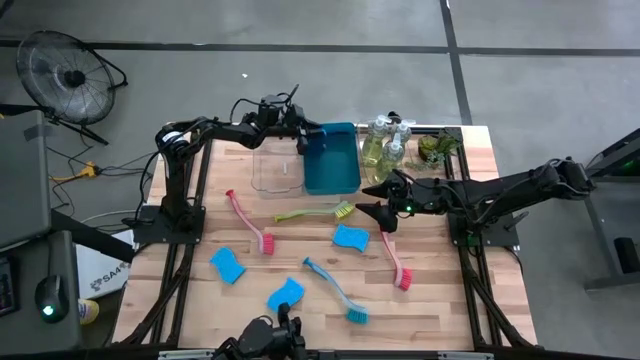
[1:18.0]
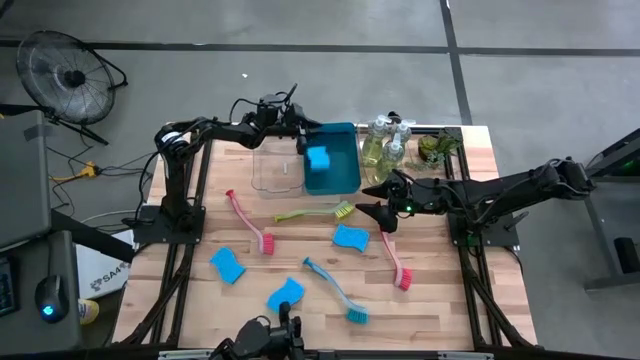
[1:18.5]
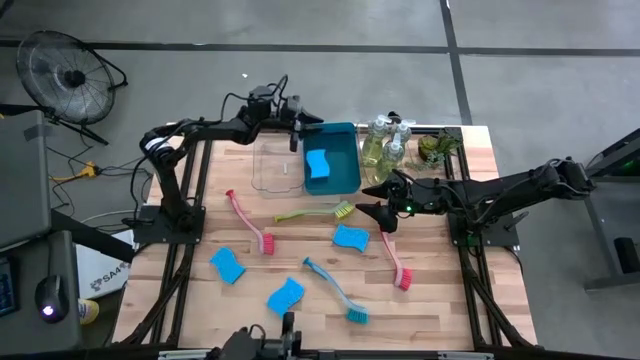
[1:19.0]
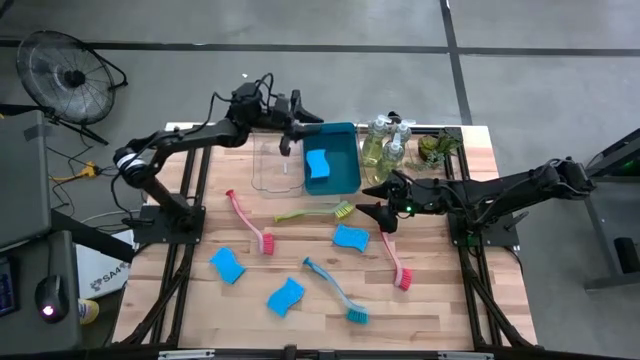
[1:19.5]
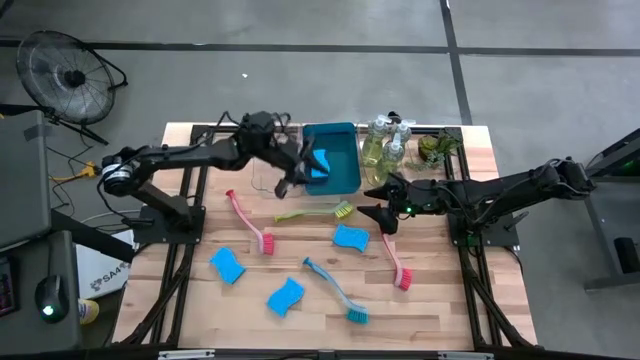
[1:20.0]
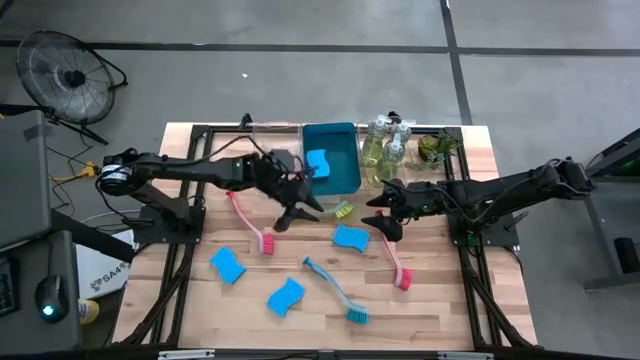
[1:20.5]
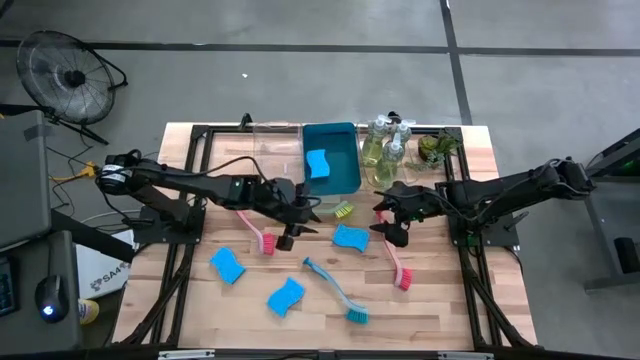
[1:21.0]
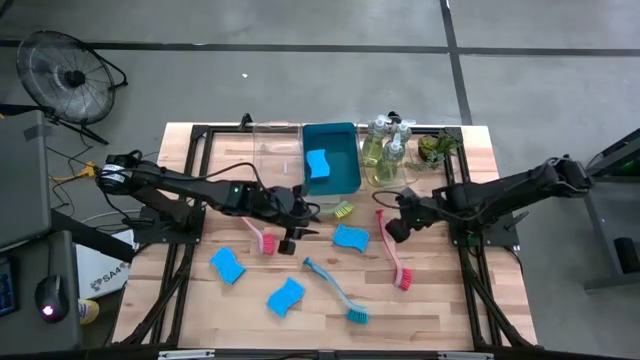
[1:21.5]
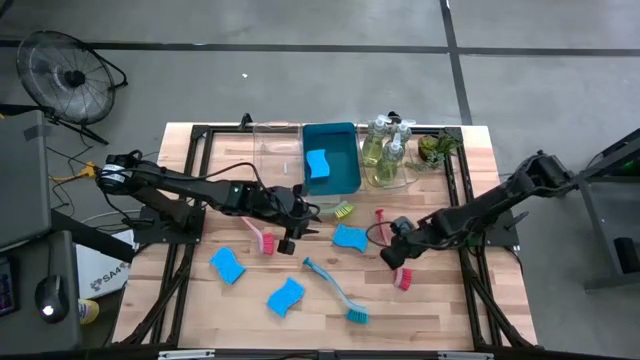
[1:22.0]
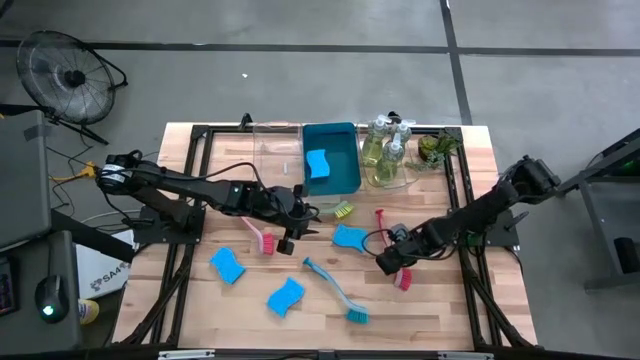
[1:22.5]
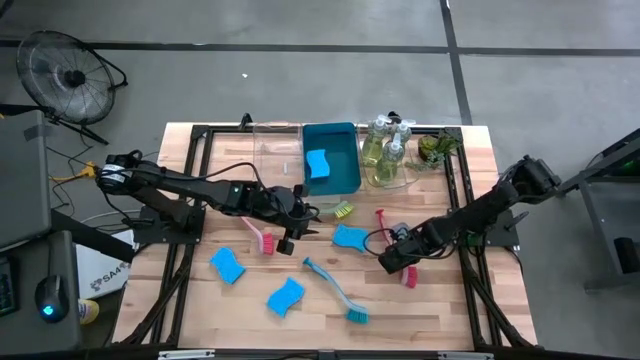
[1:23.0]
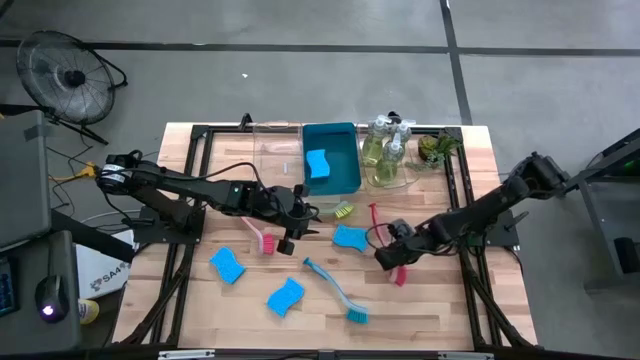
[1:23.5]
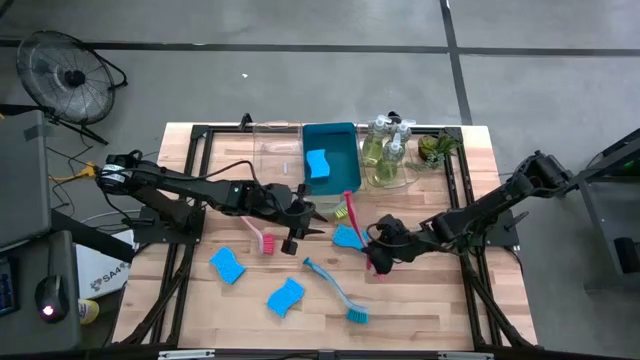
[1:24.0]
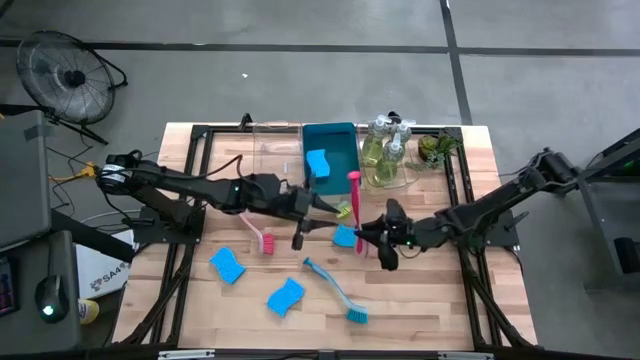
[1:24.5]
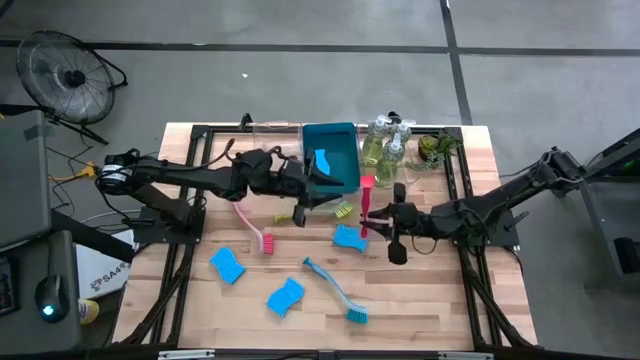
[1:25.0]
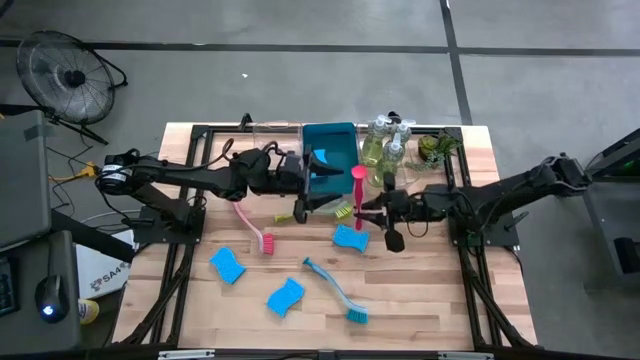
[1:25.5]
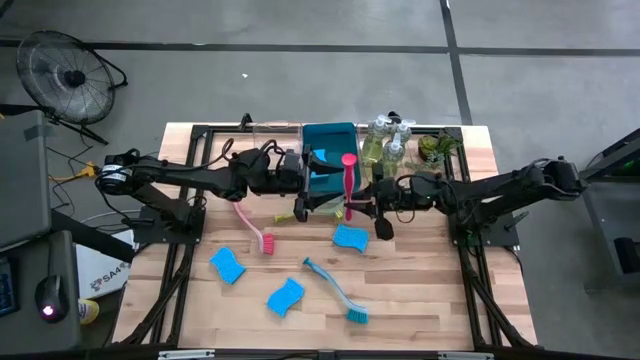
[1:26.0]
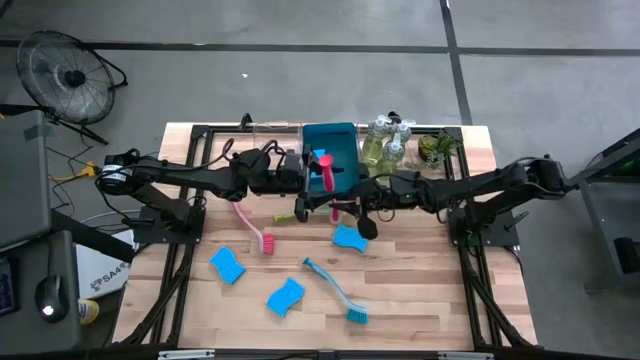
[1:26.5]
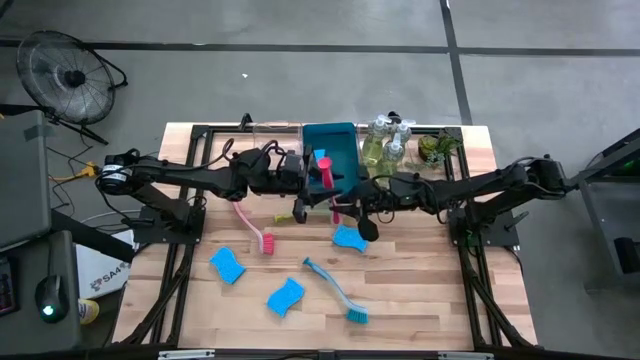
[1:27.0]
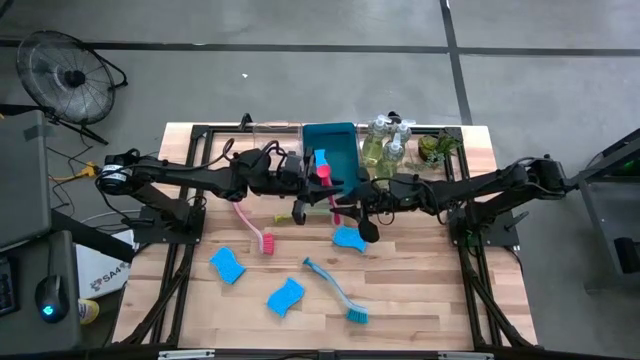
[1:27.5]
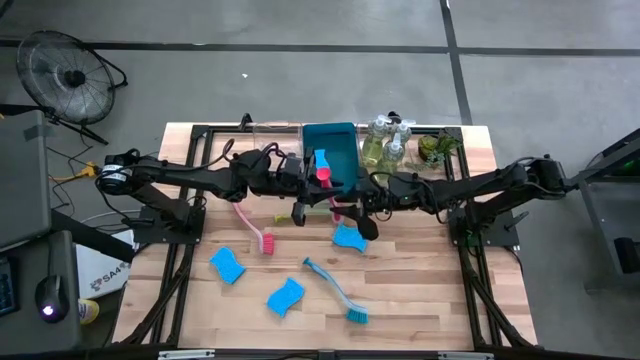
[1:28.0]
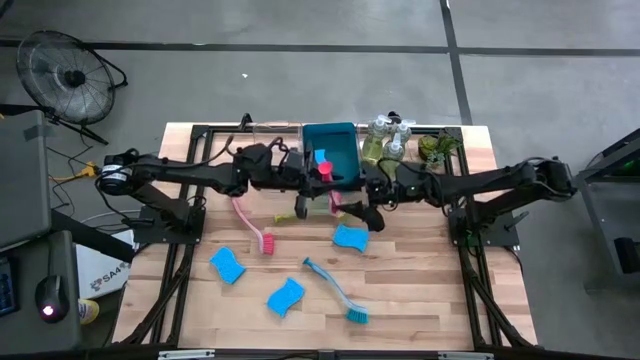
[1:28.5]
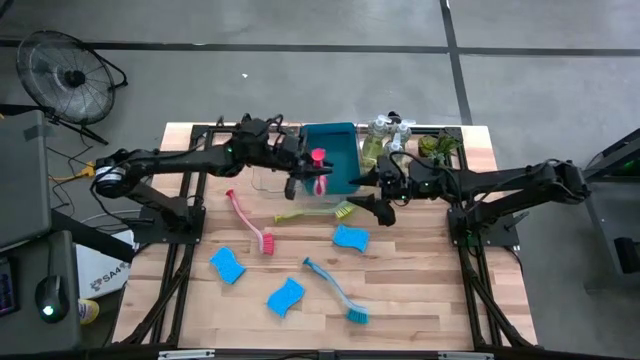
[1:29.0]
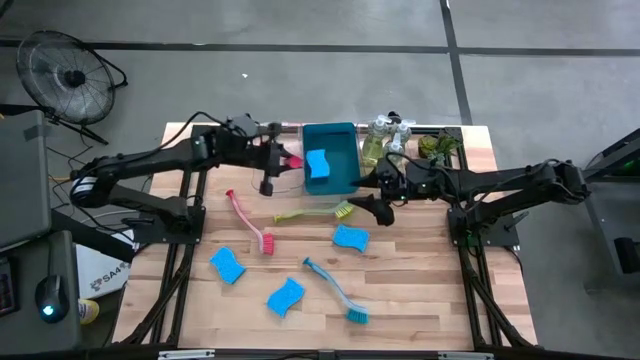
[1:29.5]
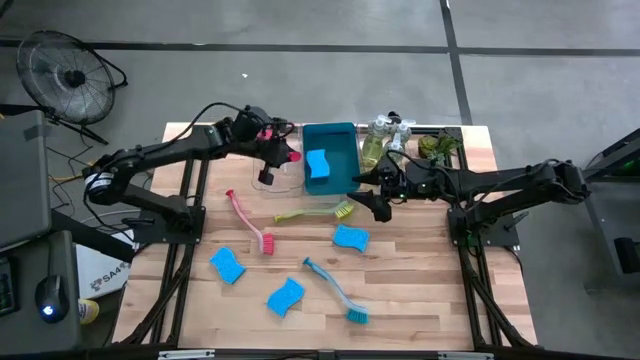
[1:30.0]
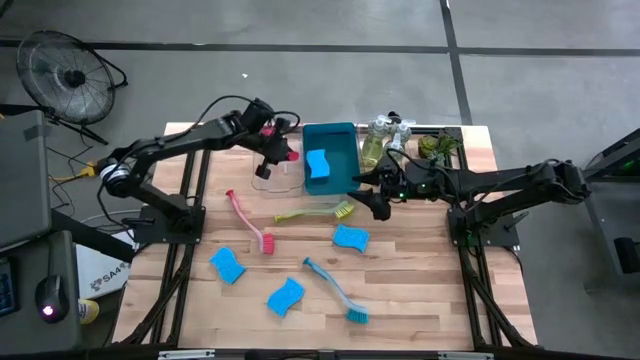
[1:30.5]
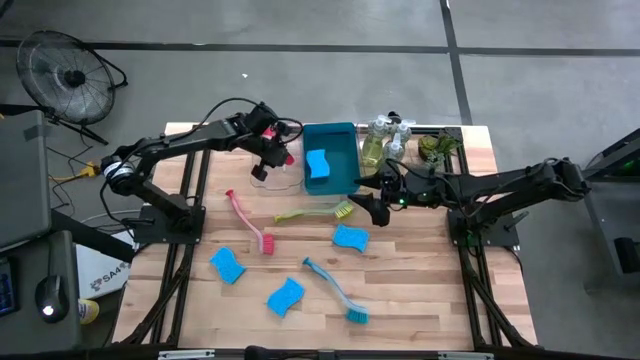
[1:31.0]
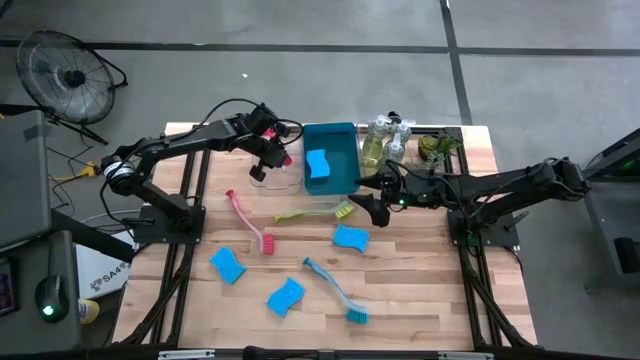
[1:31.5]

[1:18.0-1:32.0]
Task: Pick & Place Kitchen Sink Supplies
Put the red dish brush into the left transparent bin

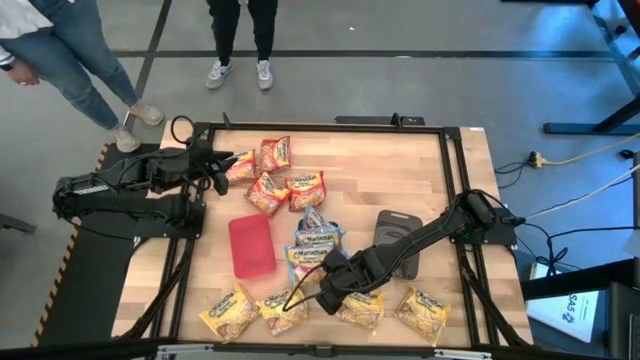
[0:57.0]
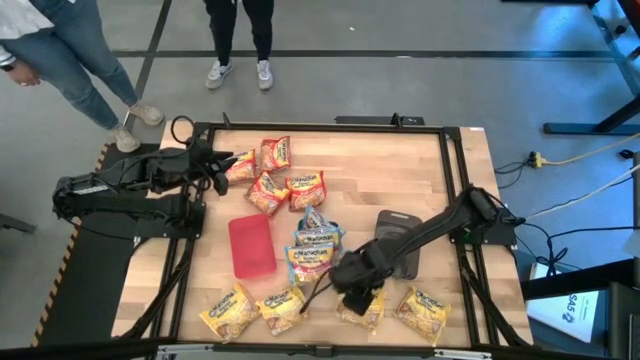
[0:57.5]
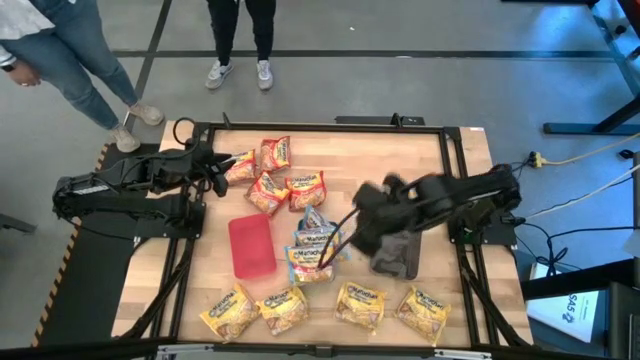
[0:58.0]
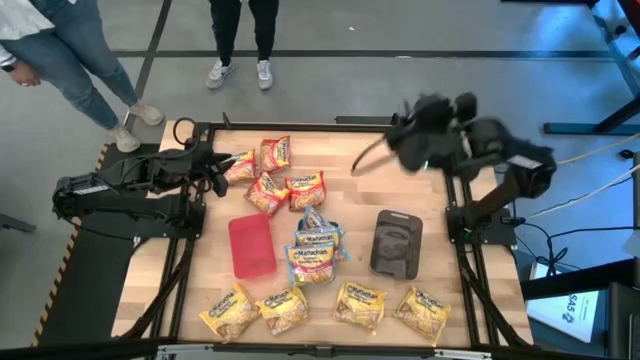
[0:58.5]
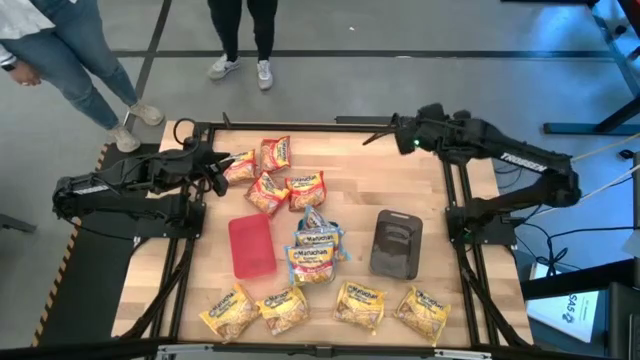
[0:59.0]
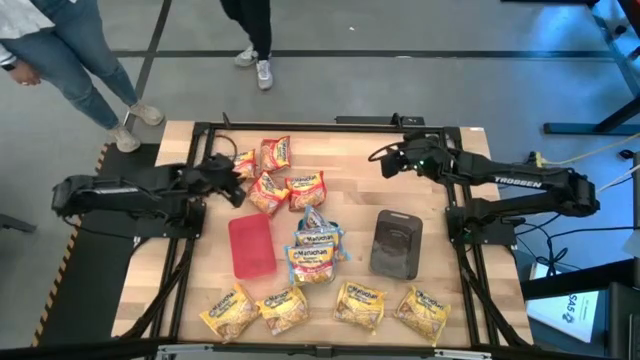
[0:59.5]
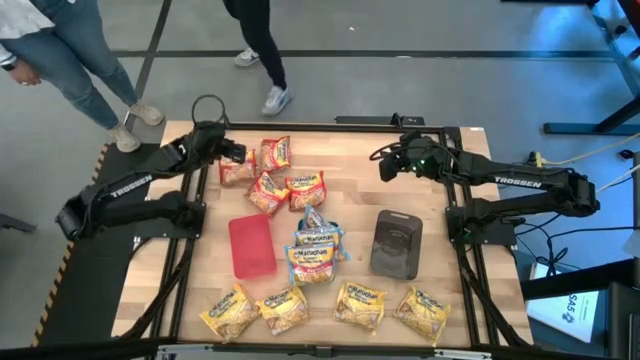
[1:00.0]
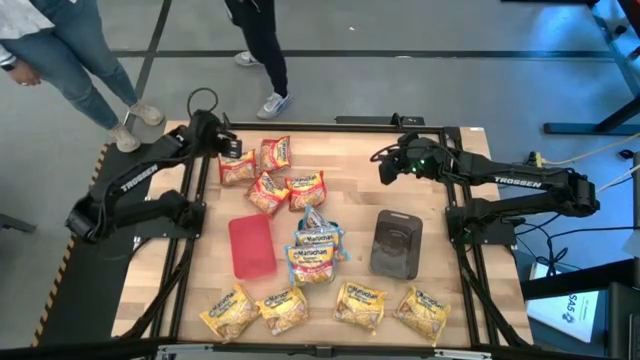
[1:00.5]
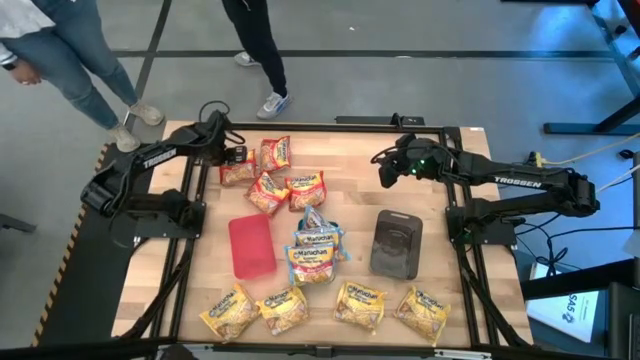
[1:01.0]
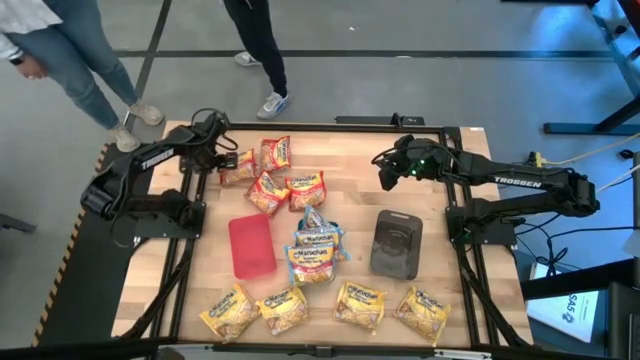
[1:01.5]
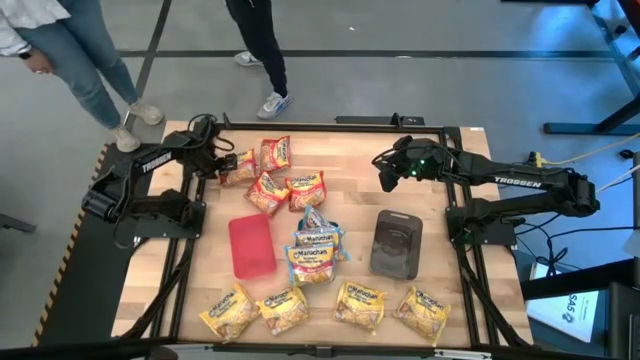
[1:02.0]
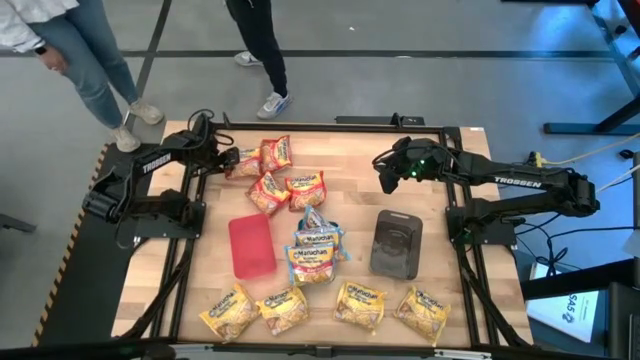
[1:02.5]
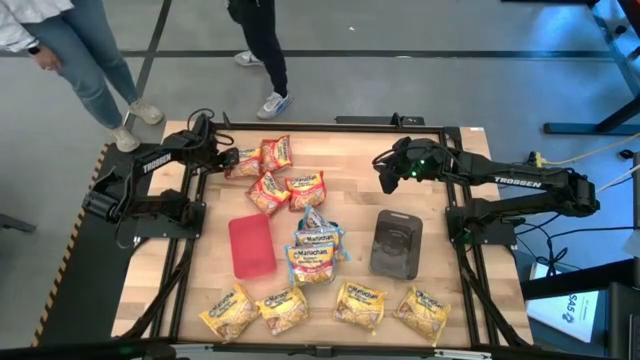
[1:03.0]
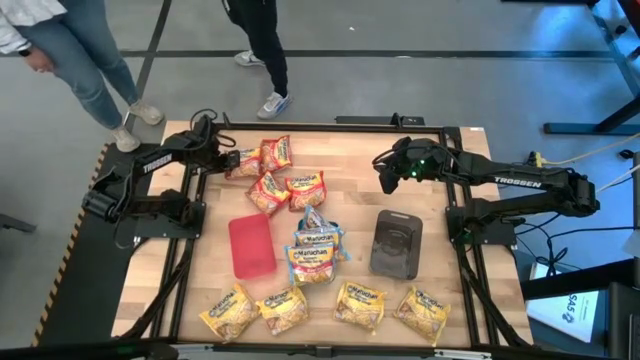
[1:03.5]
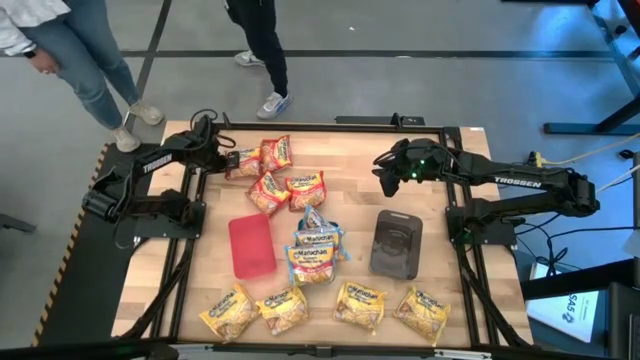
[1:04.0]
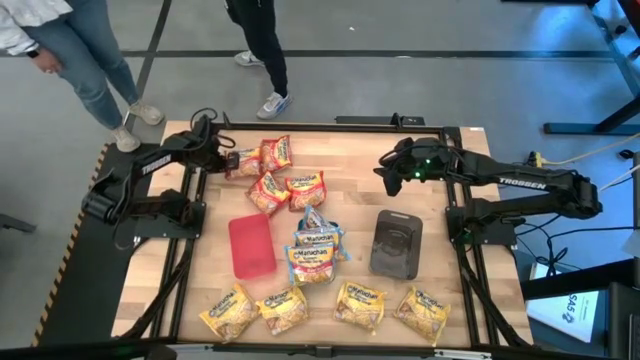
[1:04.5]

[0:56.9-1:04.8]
Task: Sort Maruchan noodles
Put the red noodle pack into the red bin
